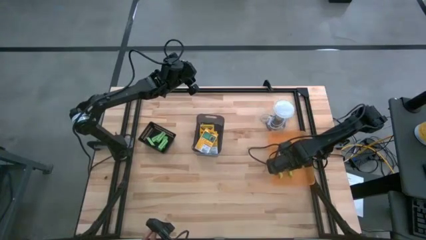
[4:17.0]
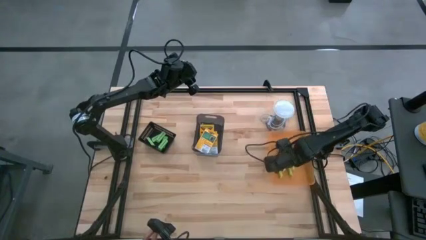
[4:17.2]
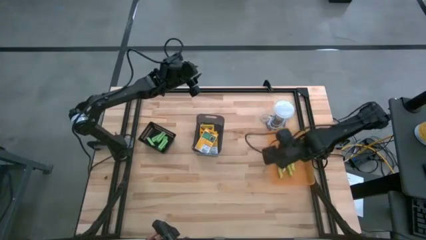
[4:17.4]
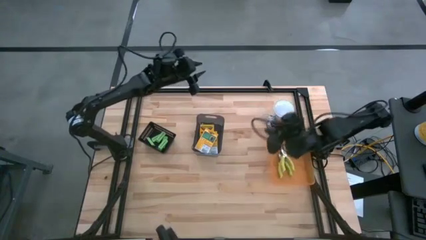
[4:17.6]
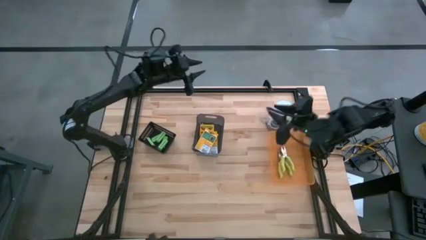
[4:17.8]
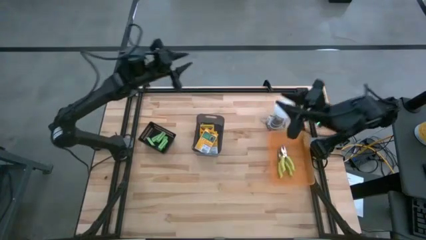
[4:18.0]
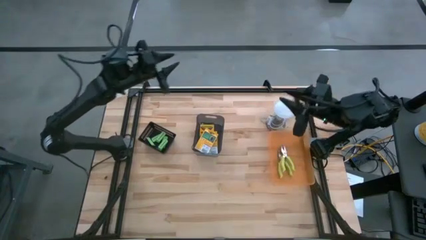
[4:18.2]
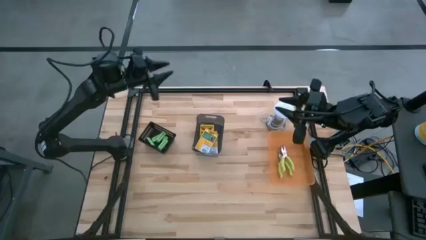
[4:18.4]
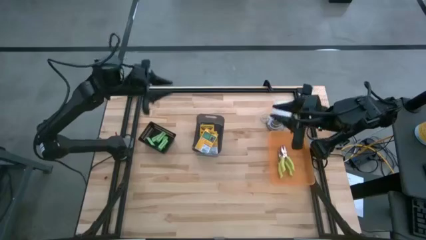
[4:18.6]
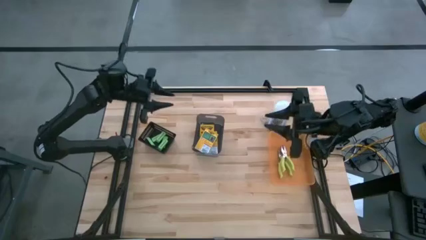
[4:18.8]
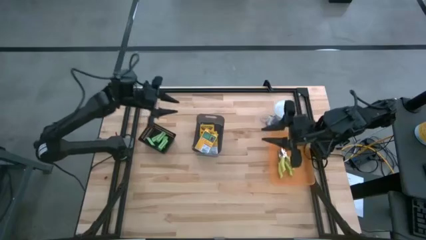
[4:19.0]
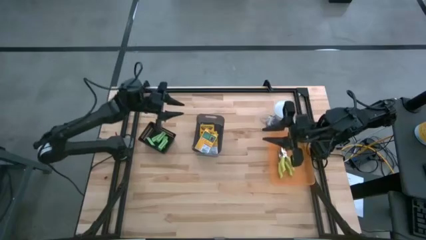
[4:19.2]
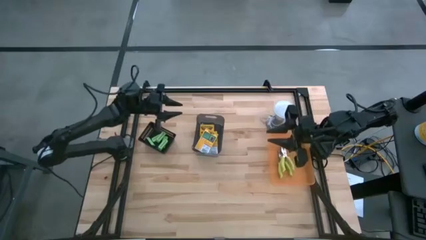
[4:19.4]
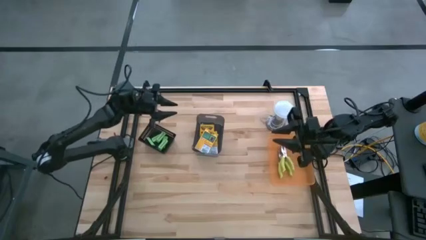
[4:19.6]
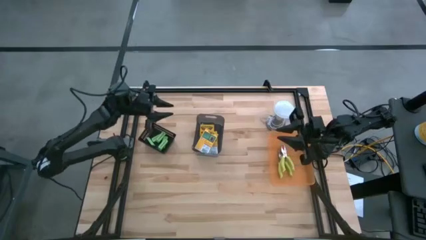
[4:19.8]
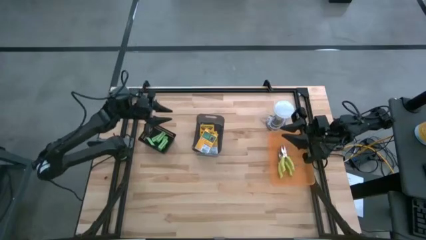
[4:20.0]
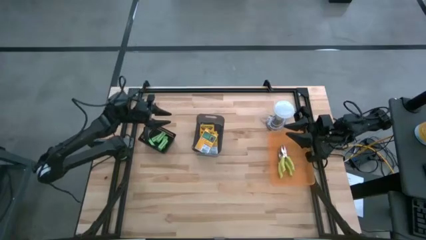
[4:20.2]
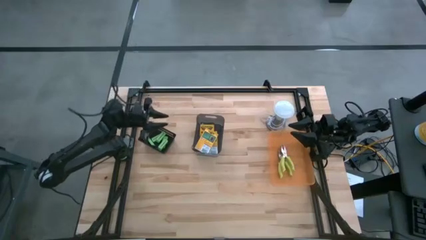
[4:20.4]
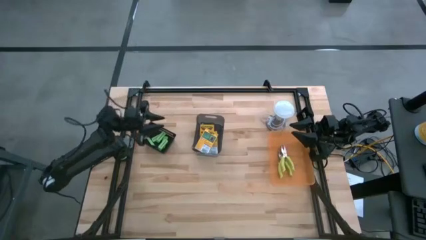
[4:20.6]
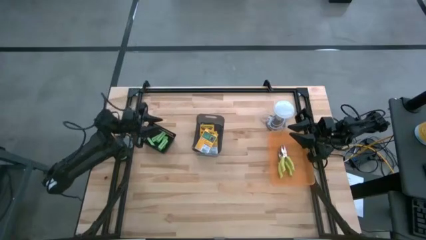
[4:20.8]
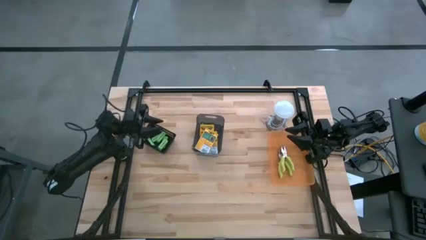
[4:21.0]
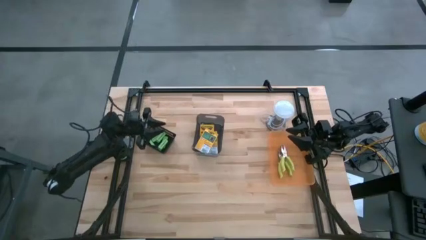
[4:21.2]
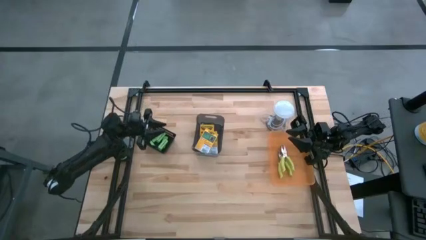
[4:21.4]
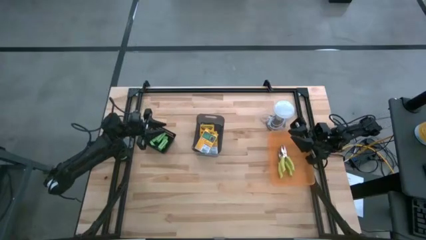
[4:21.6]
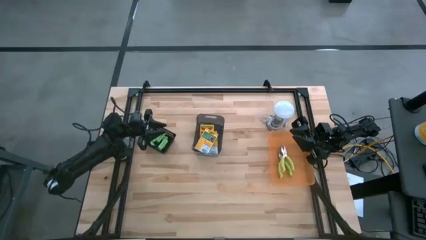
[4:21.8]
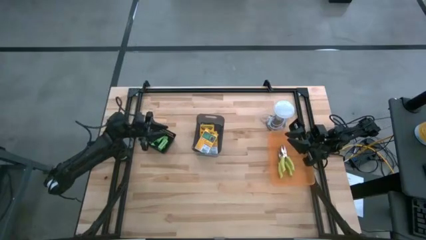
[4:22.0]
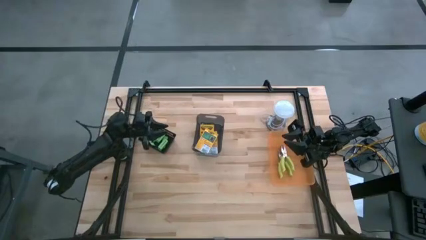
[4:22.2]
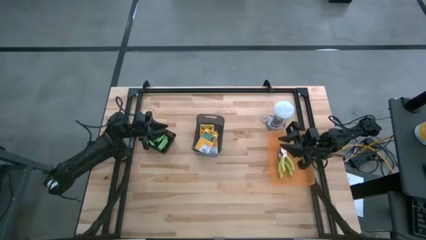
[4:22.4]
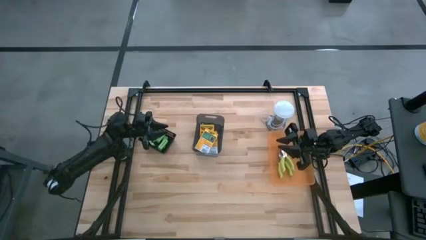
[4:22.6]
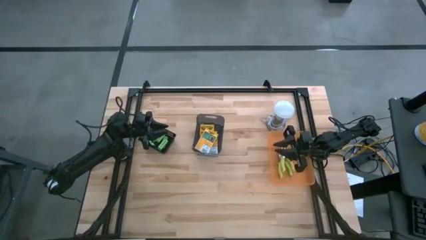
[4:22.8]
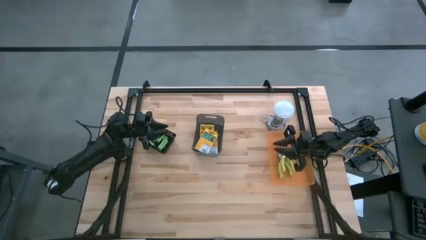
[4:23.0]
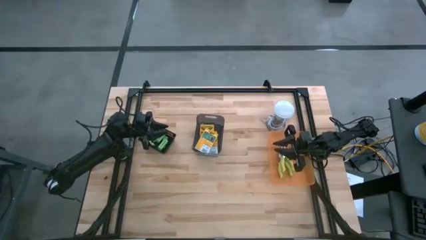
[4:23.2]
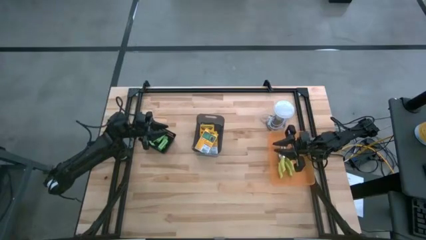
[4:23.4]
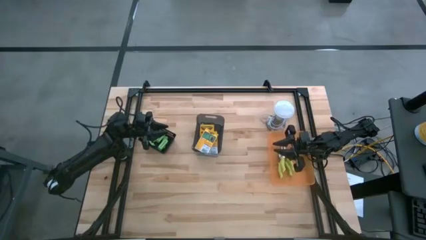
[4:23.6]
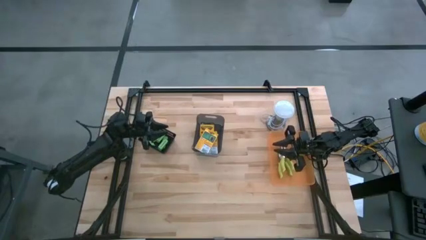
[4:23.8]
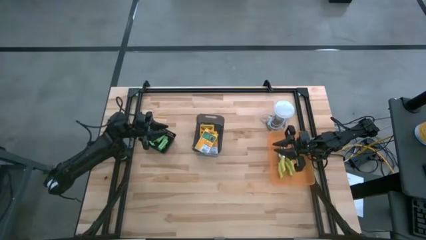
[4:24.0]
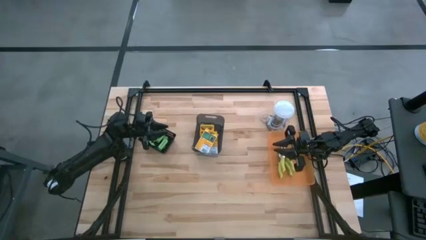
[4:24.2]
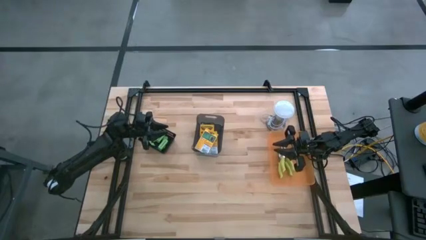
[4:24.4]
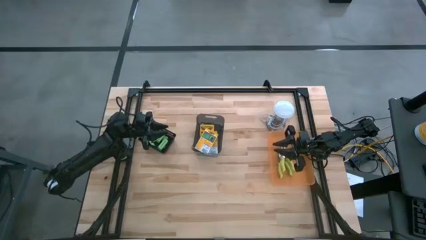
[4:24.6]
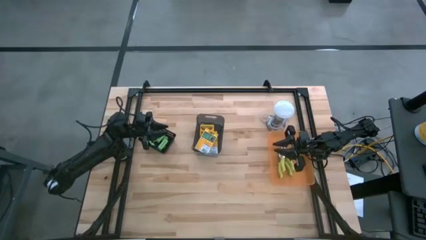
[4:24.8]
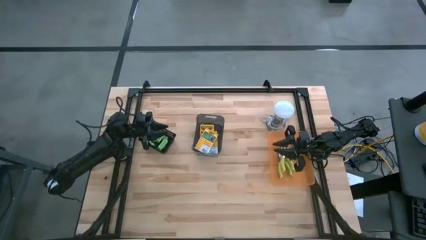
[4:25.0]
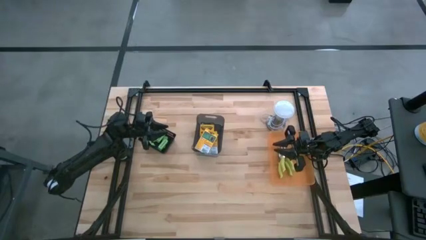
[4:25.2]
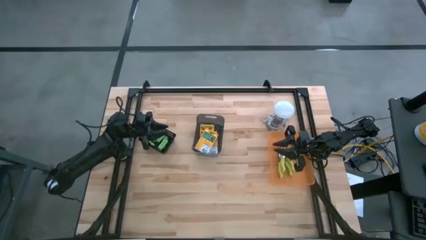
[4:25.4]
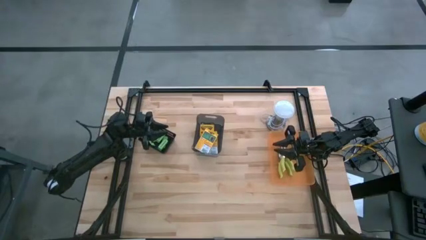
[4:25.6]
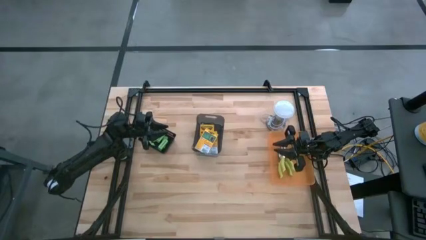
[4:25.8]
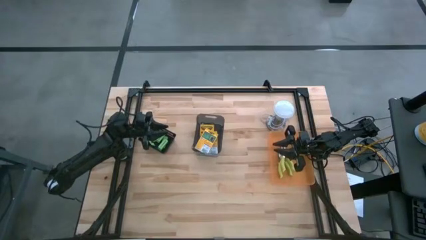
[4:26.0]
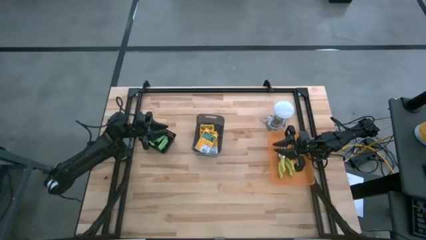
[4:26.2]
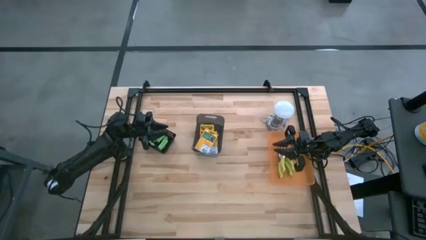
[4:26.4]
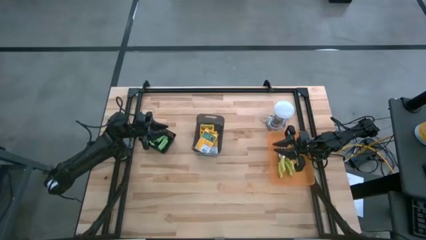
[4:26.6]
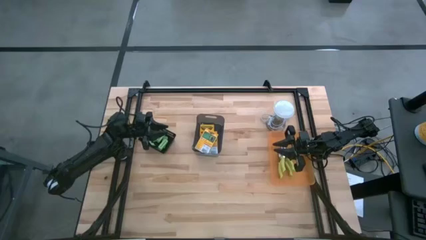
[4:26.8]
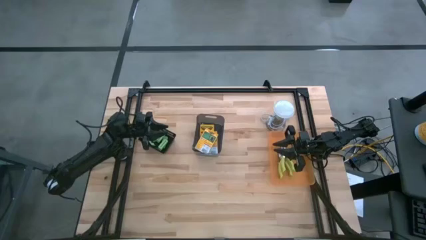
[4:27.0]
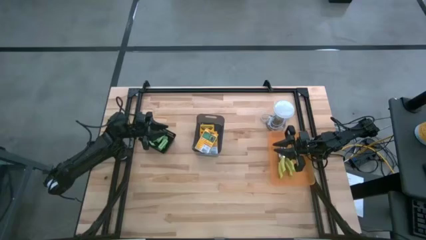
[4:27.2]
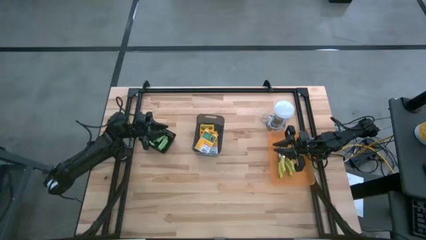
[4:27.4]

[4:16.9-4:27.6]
Task: Pick & Place School Supplies
Return to Home Position

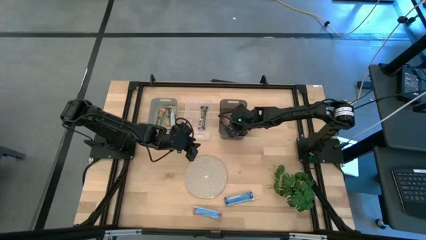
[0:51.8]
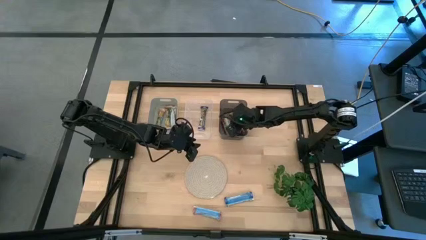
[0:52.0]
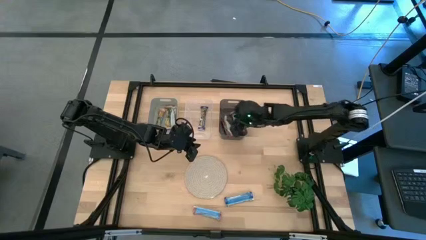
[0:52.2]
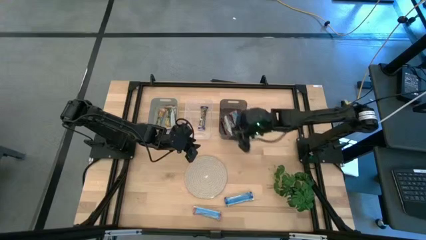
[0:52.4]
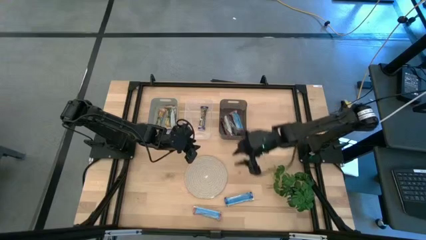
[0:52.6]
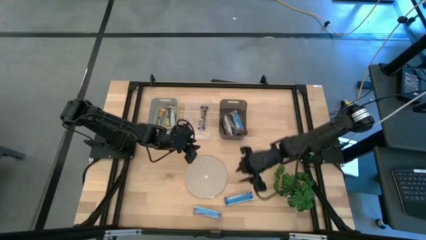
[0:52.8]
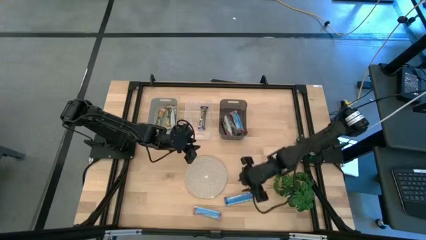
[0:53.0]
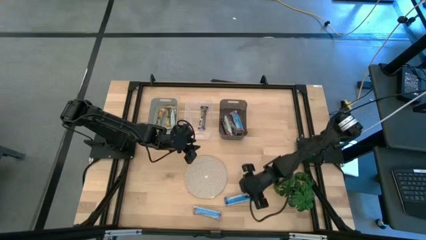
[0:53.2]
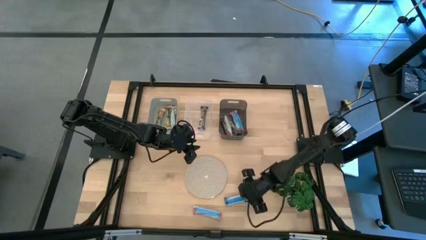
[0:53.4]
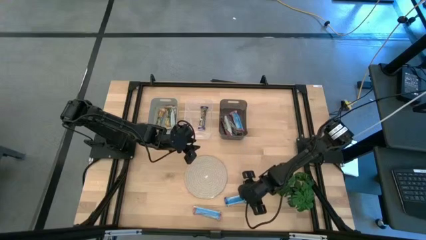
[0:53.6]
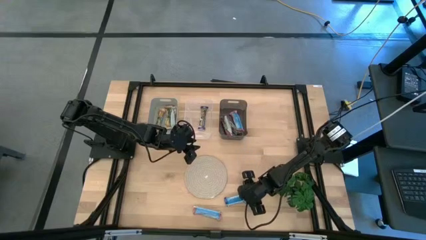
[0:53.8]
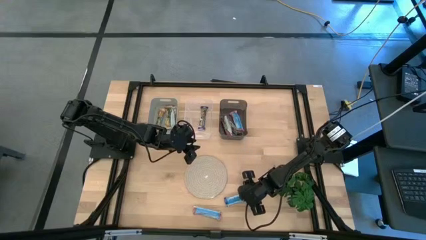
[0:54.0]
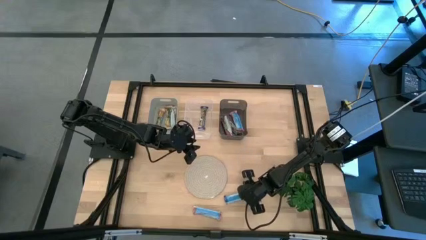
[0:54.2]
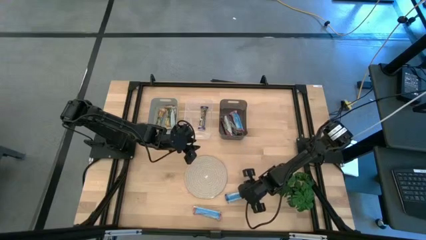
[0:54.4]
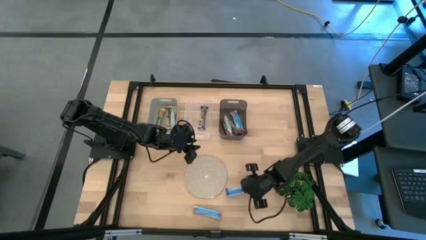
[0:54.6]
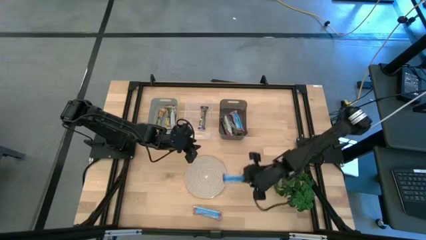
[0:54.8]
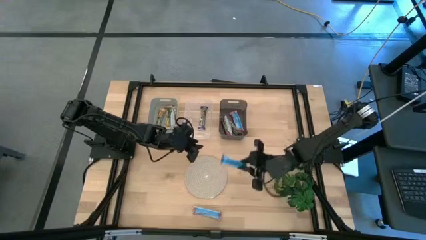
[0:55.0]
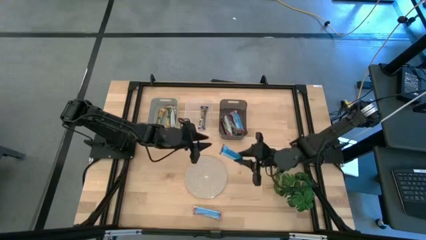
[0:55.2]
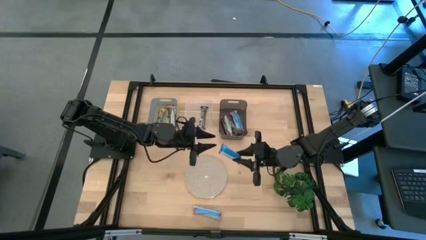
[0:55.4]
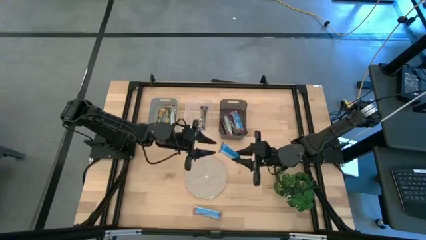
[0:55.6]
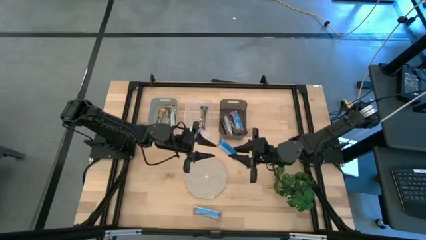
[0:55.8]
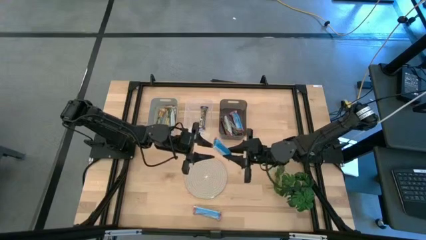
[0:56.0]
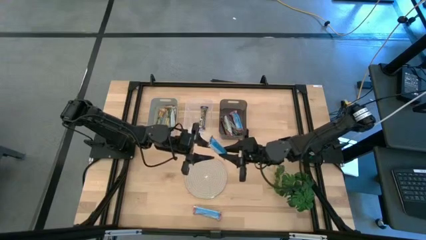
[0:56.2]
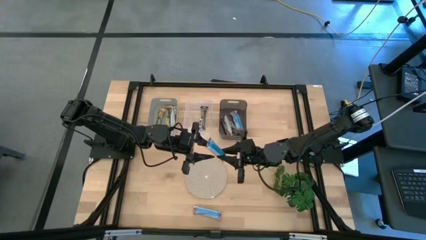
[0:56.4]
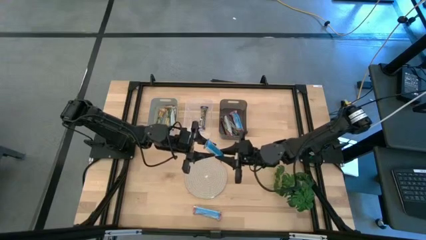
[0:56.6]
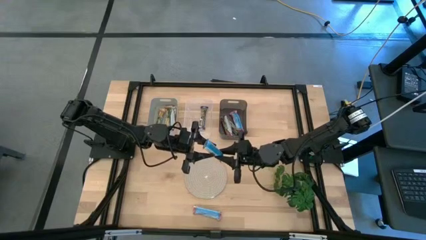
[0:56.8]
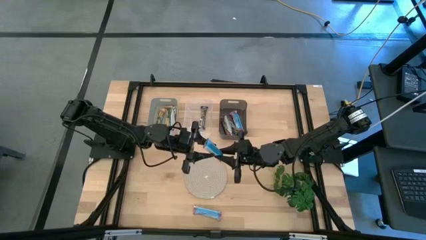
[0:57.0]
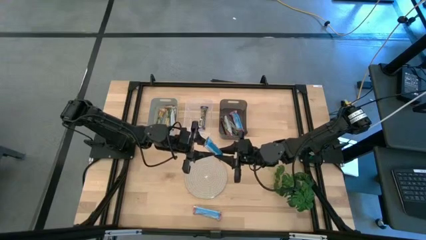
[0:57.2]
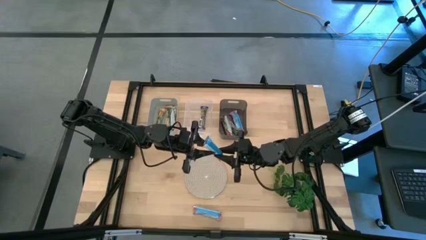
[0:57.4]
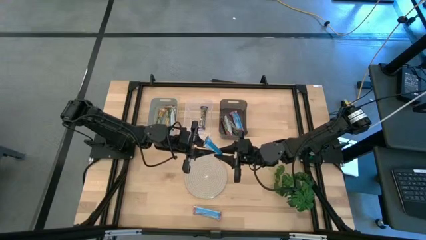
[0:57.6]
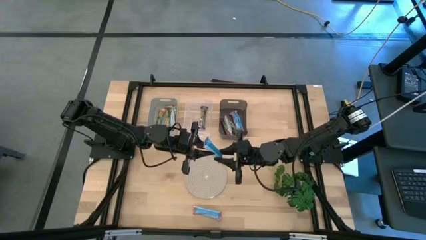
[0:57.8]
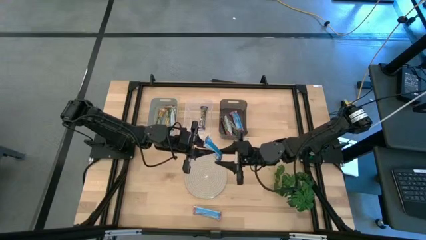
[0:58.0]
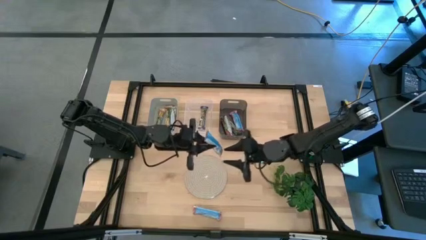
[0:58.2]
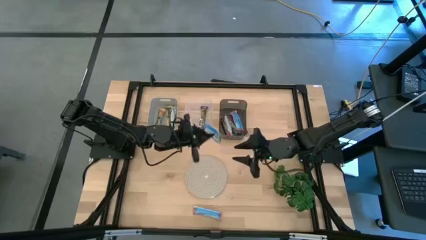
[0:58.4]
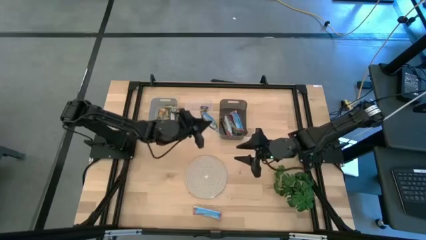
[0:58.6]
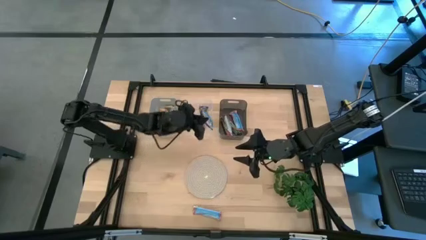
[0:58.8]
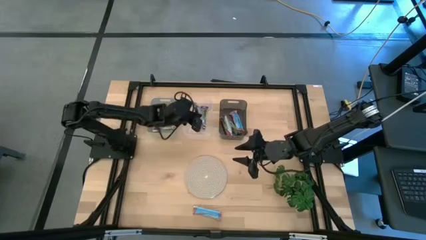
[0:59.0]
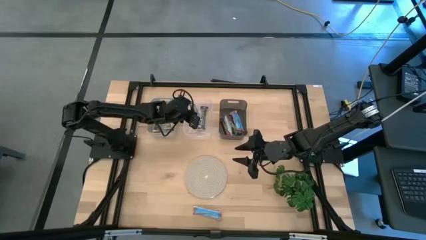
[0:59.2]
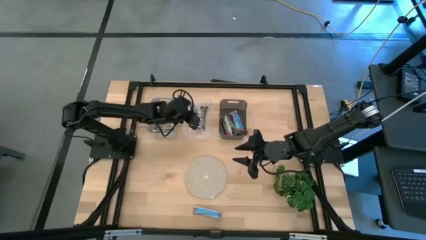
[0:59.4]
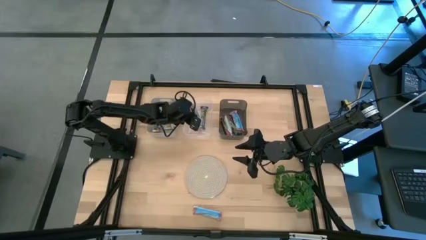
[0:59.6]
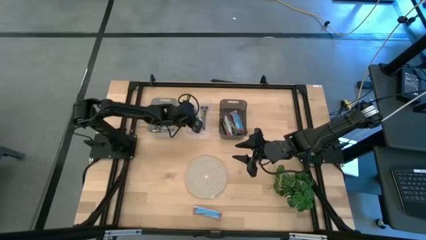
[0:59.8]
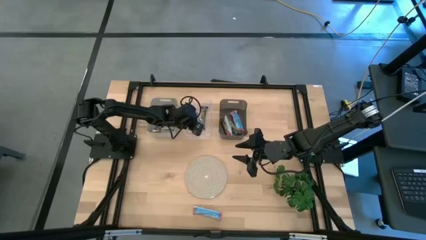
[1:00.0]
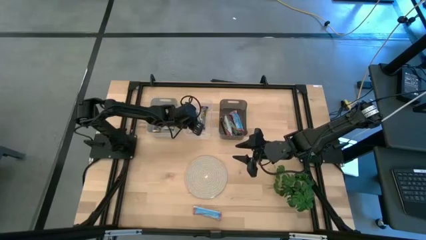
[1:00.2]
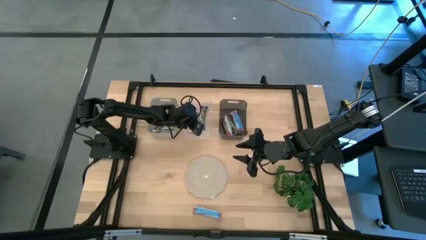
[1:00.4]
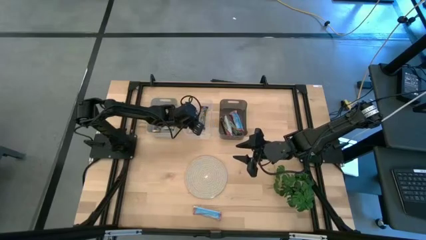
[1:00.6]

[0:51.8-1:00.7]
Task: Pick and place Granola Bars by type
Put the blue granola bar into the transparent bin
